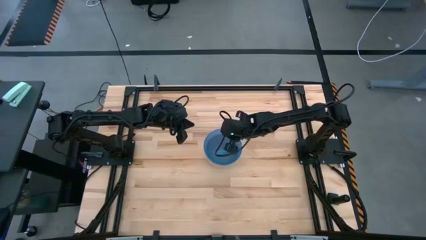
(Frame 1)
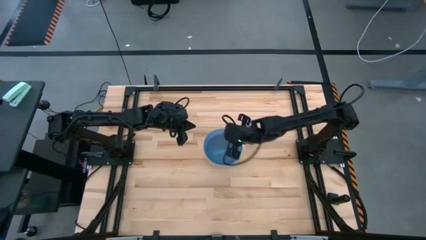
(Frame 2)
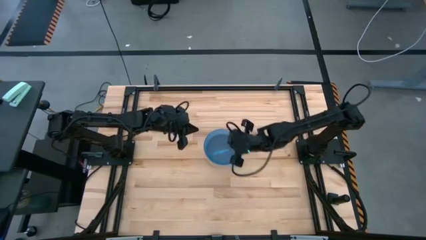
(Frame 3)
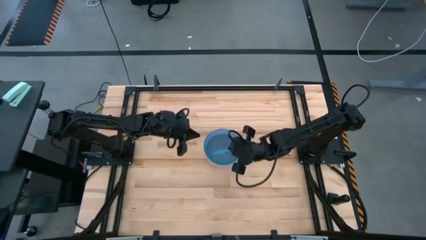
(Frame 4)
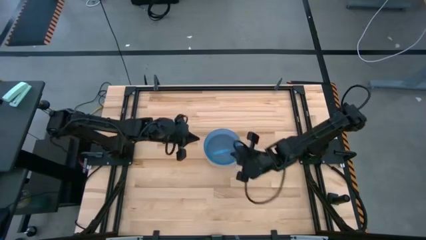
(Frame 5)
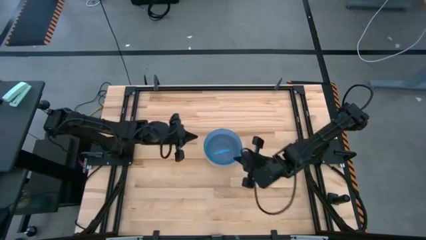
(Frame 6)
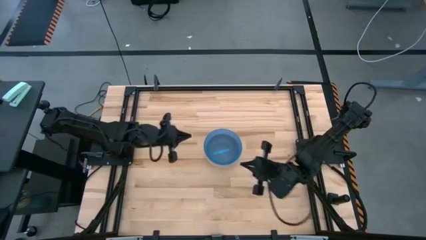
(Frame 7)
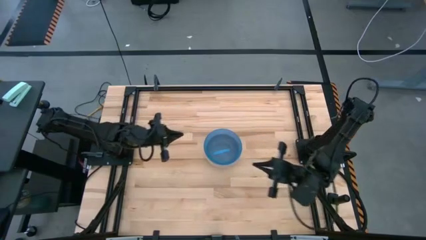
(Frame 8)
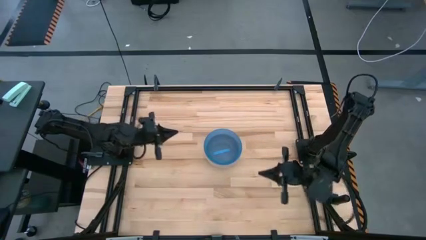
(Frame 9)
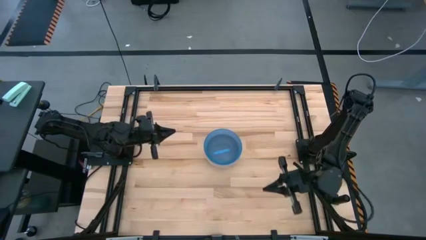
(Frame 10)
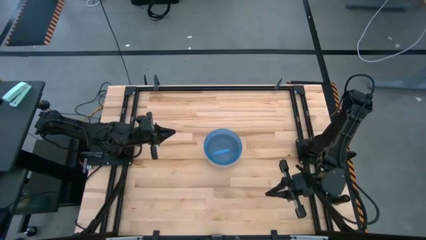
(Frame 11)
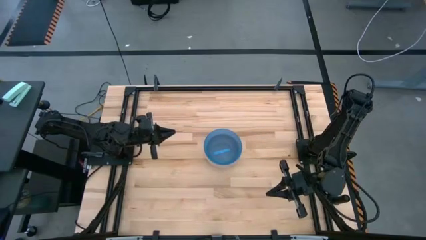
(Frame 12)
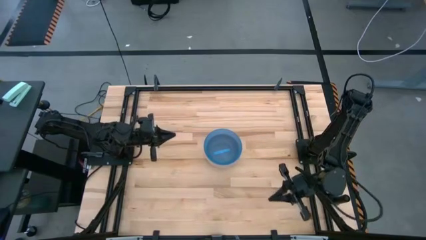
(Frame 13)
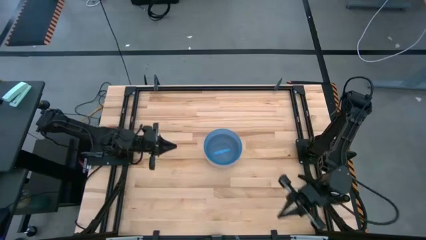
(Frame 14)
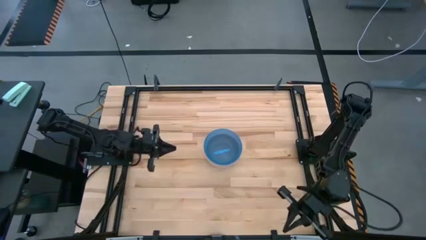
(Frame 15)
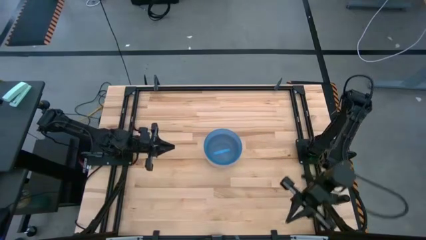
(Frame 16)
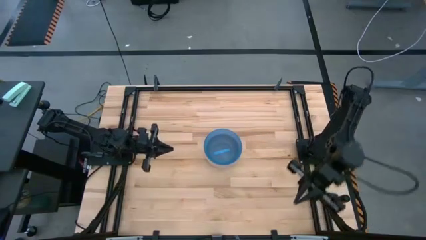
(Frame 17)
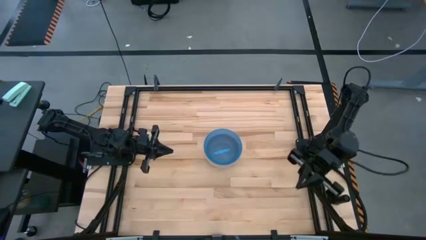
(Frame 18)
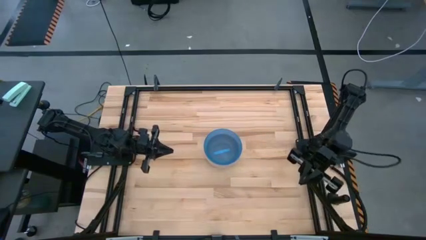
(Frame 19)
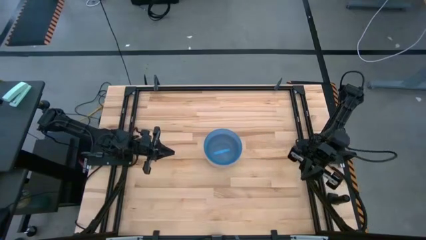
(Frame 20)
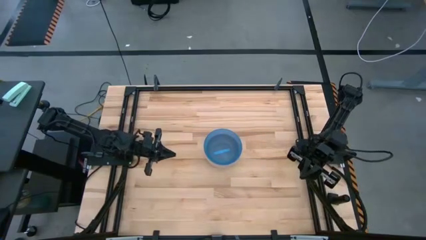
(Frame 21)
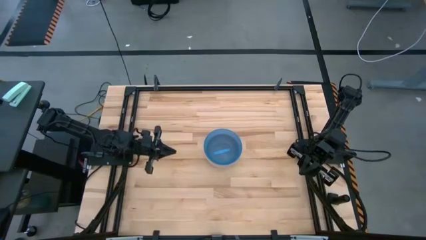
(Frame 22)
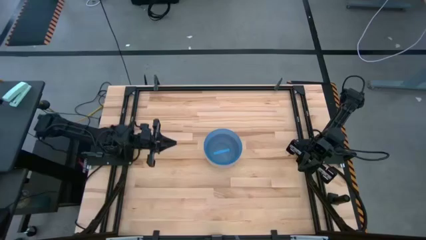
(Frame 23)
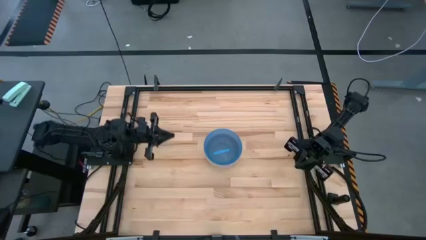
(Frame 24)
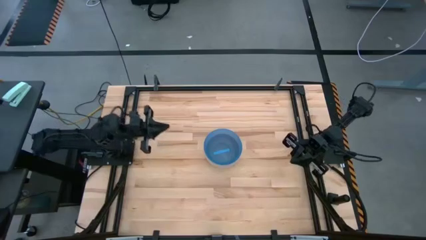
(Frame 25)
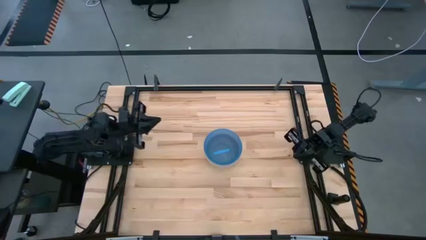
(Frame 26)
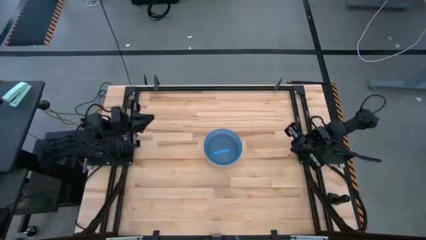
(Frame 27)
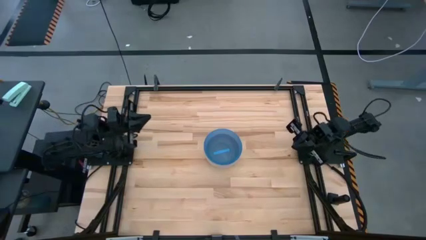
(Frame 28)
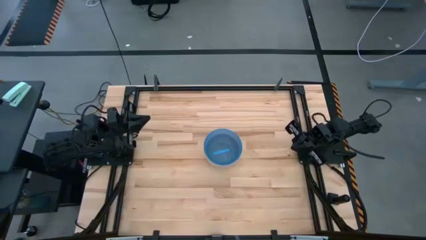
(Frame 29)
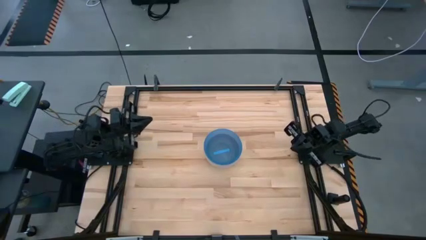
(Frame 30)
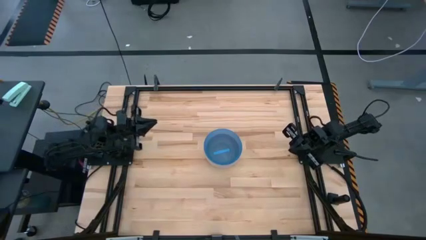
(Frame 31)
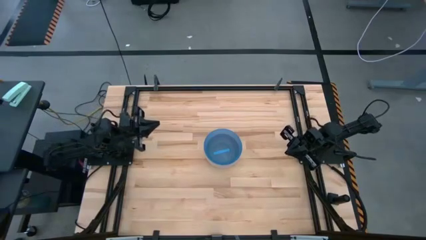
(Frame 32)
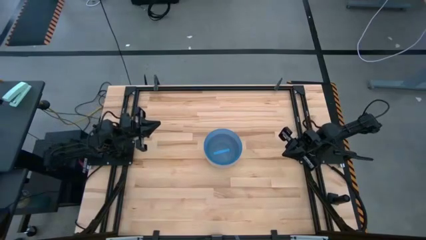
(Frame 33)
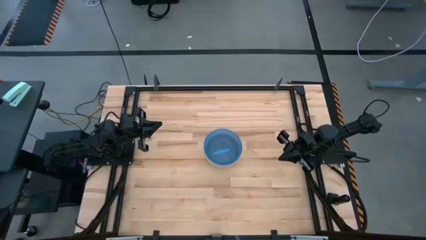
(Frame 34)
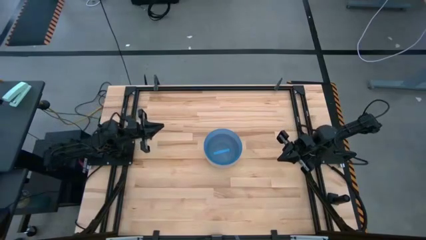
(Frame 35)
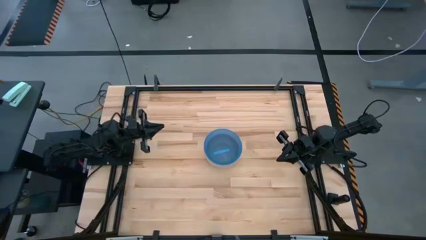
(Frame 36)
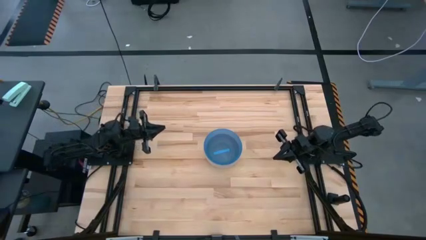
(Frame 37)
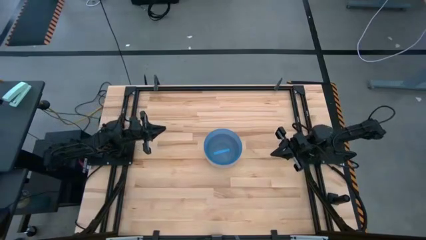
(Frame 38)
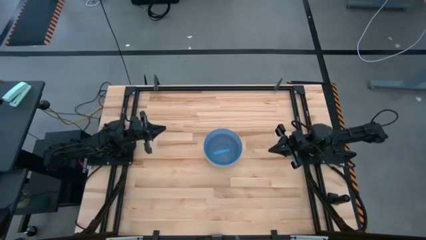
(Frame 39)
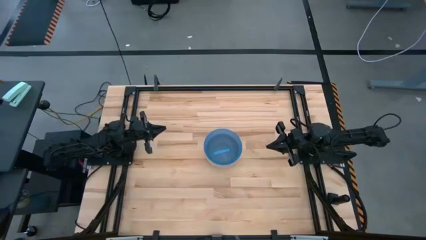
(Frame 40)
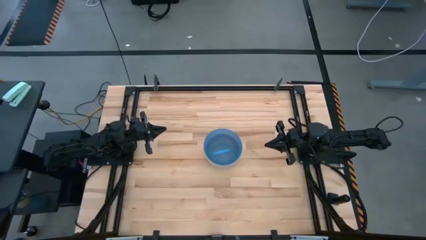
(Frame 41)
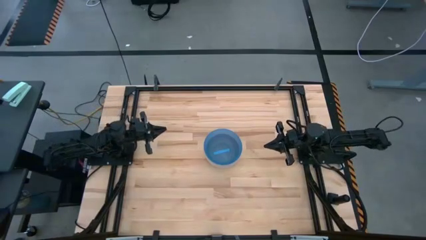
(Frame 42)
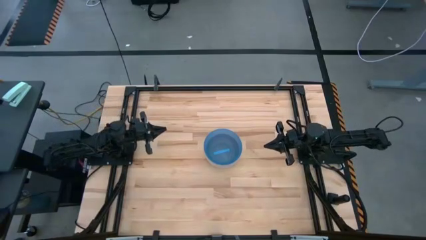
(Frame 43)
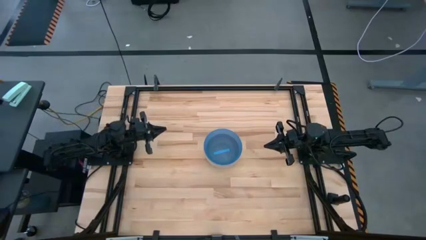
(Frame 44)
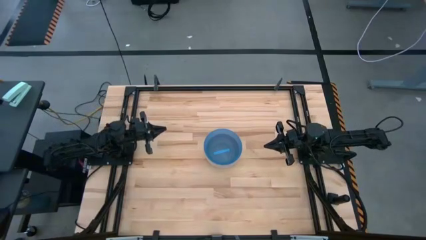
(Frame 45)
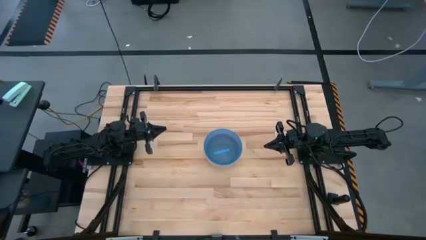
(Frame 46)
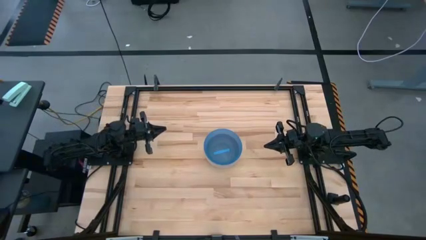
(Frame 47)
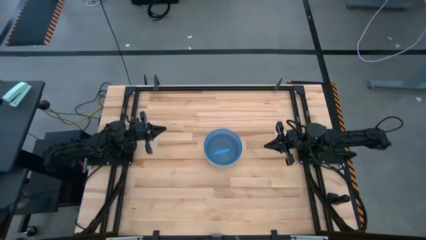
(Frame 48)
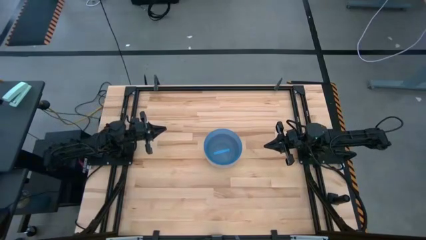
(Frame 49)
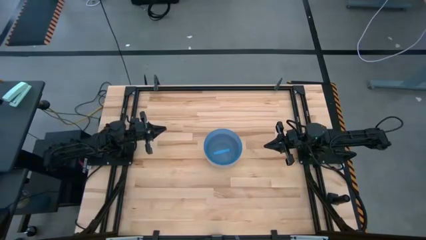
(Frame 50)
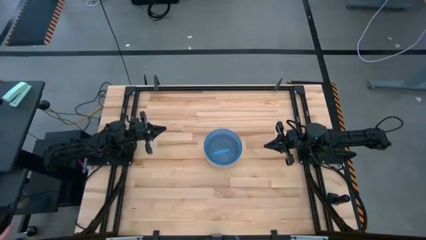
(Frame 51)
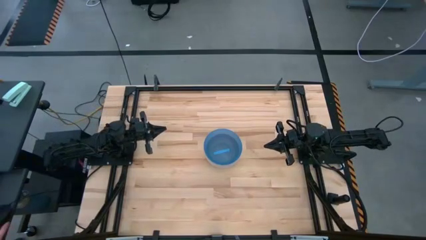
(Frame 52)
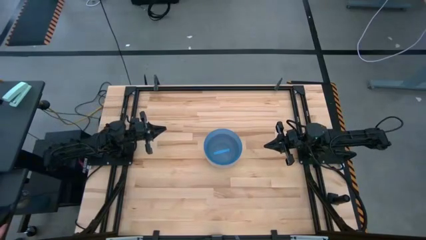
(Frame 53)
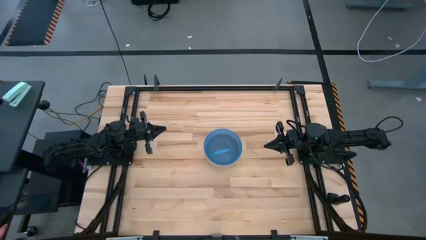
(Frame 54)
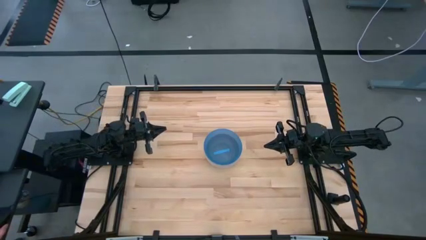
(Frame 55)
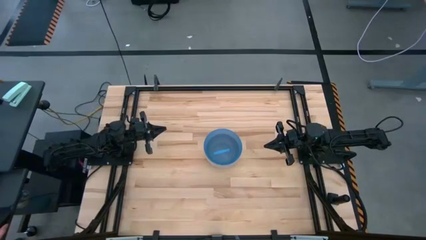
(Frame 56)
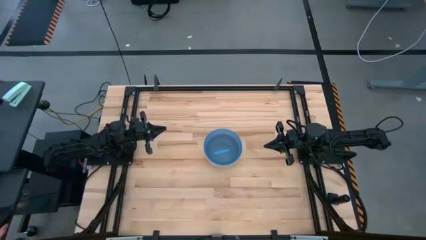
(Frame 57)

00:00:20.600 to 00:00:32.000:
Task: Nest bowls inside each other
Return to Home Position

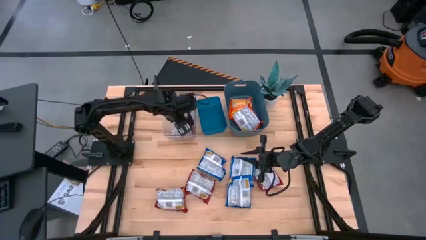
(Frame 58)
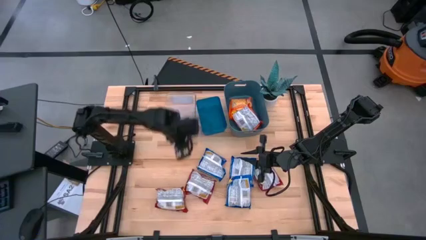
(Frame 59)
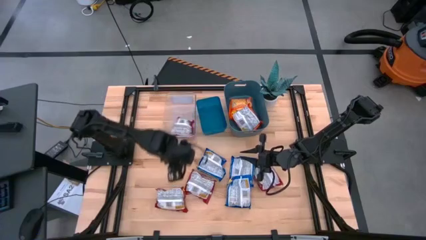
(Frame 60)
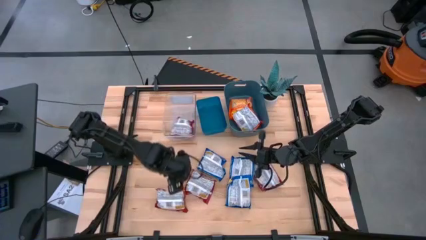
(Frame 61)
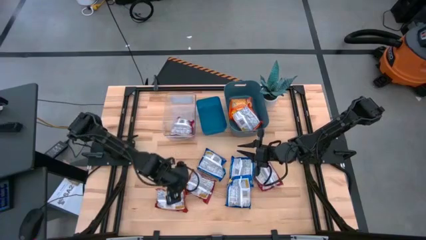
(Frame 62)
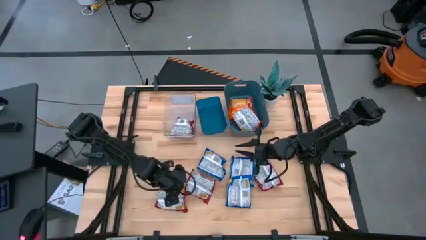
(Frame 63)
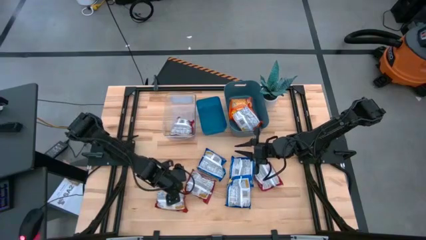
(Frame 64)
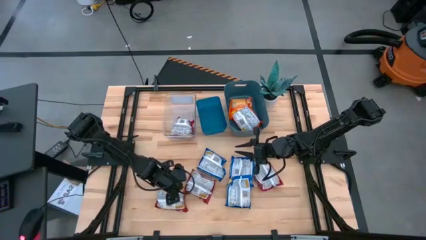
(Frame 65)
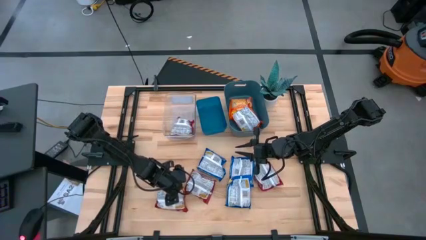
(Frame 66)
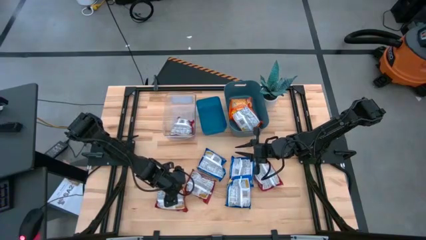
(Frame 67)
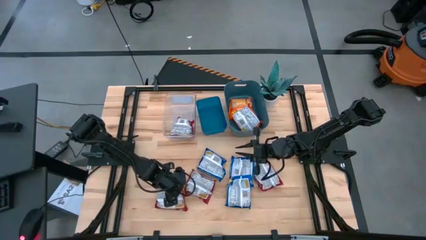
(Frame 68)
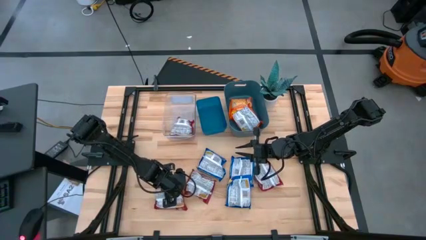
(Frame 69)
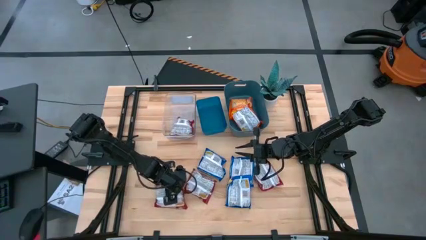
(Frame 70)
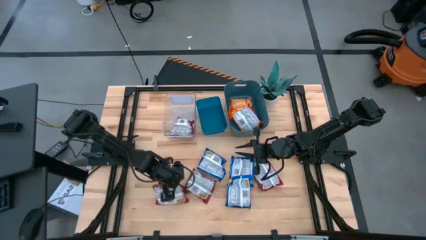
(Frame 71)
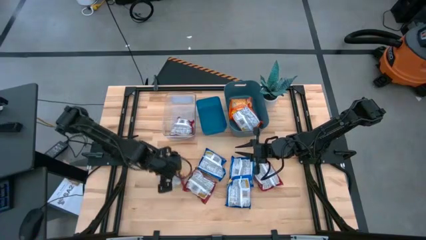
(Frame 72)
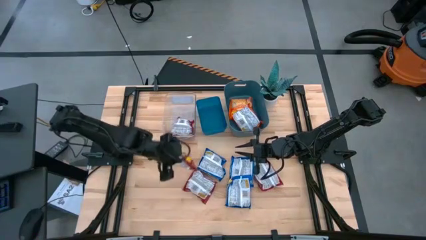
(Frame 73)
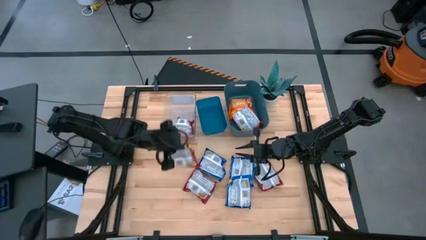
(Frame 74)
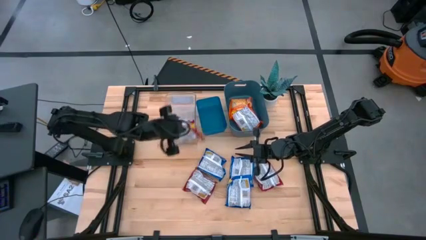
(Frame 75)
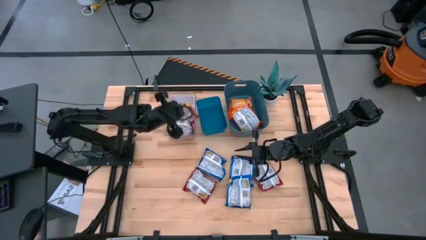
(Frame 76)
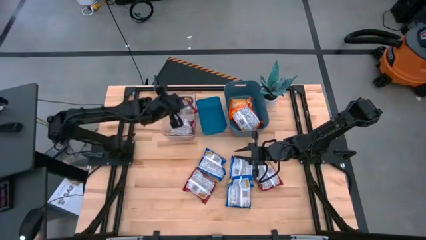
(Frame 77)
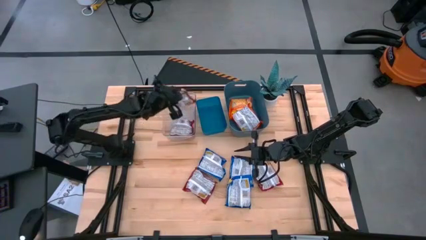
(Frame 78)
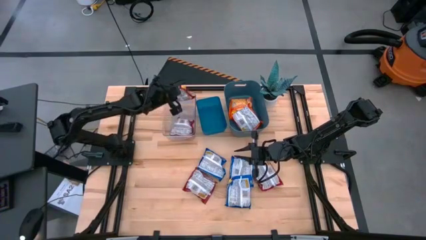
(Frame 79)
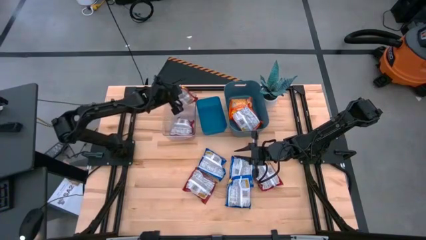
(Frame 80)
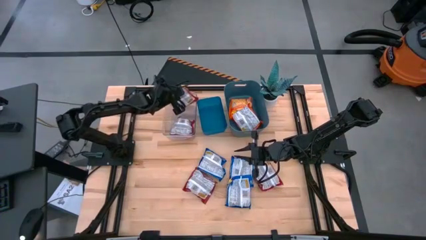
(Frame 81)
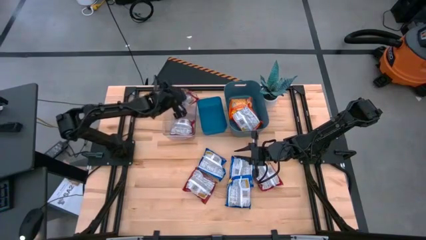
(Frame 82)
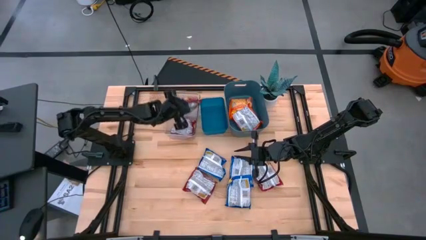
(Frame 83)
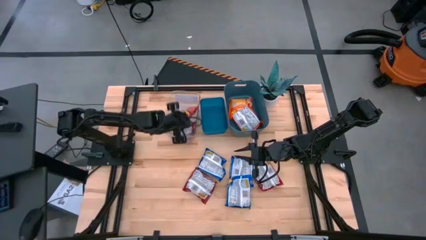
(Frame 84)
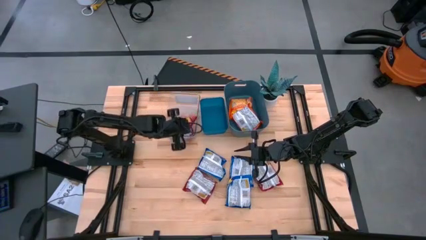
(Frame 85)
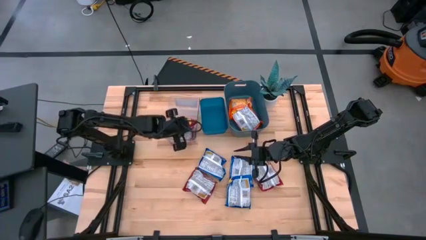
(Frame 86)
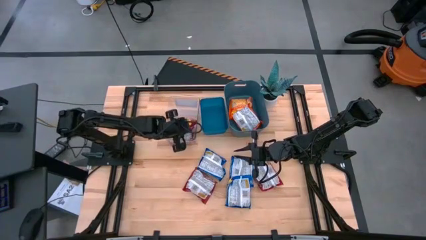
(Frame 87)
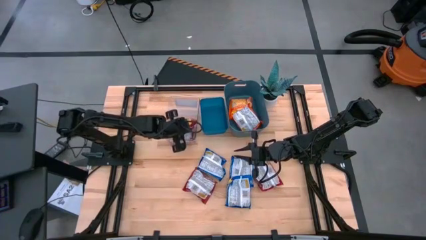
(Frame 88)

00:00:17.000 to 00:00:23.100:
Task: Sort Maruchan noodles
Put the red noodle pack into the transparent bin

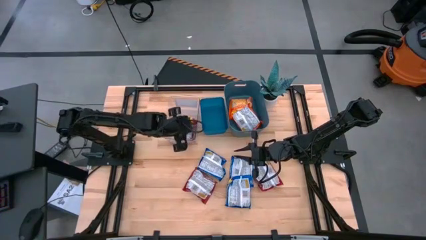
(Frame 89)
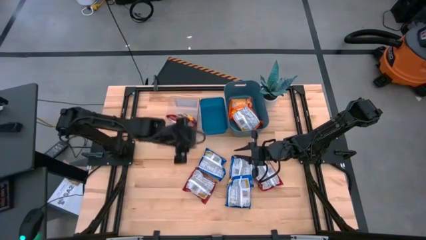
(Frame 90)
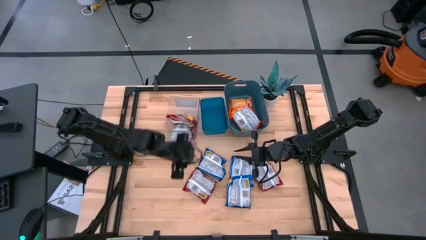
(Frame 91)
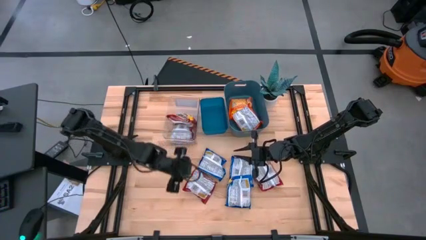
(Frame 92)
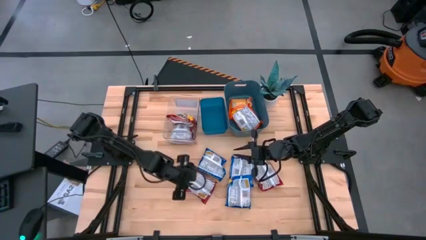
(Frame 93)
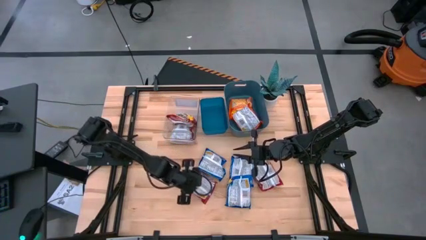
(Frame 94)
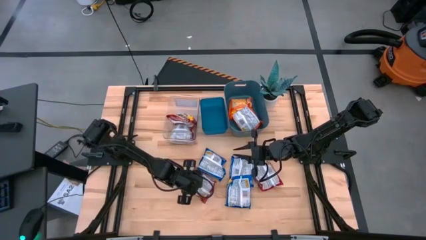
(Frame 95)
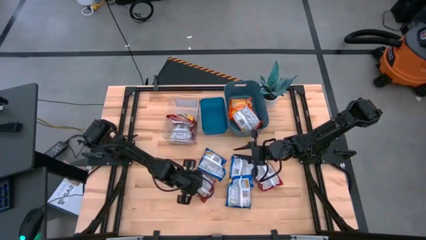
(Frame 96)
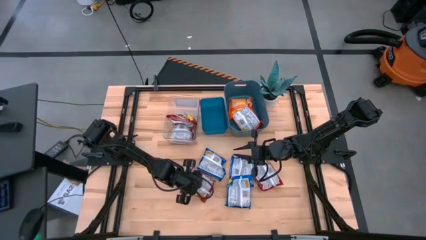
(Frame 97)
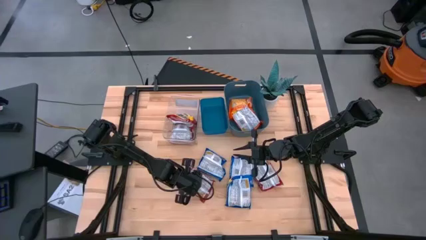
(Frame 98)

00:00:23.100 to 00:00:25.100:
Put the red noodle pack into the transparent bin
